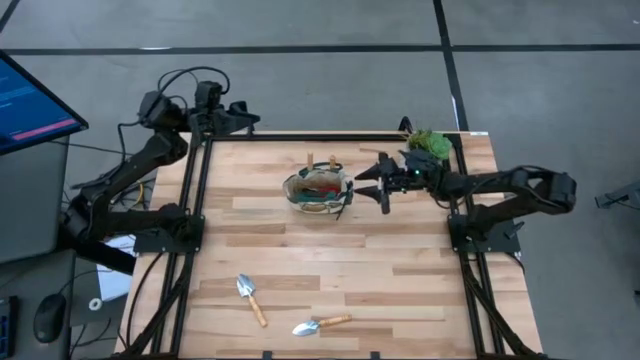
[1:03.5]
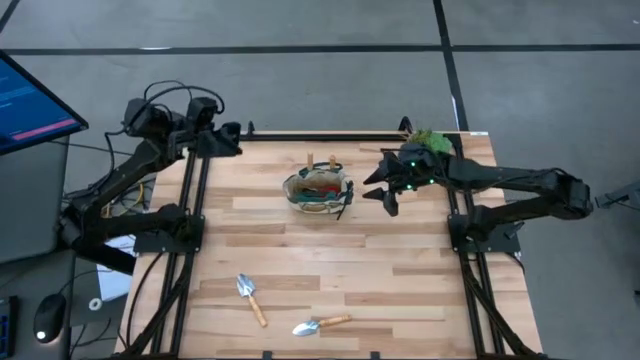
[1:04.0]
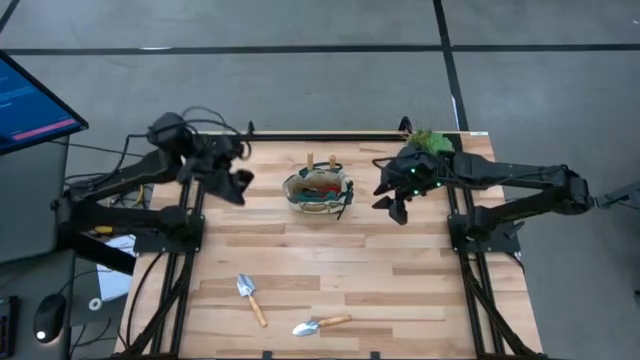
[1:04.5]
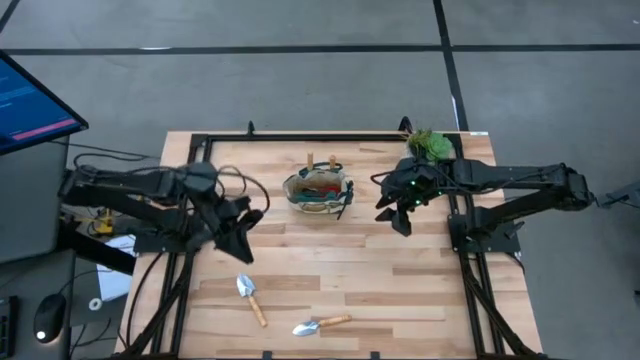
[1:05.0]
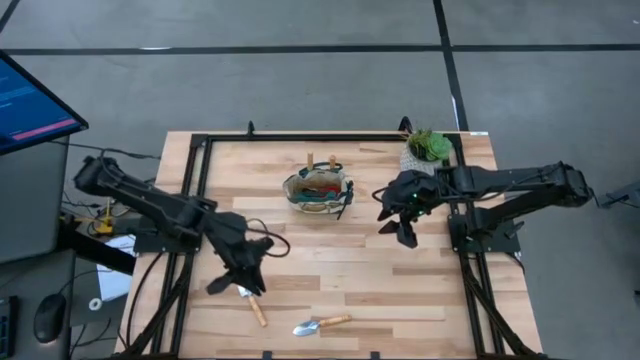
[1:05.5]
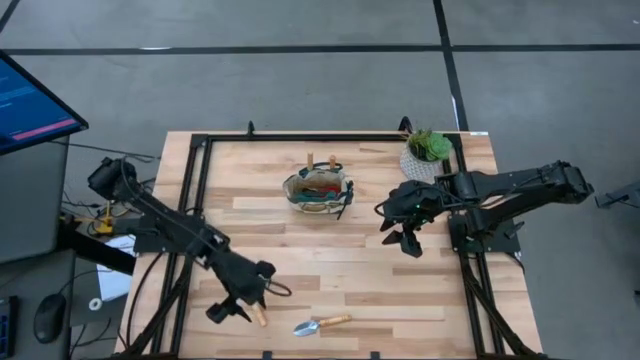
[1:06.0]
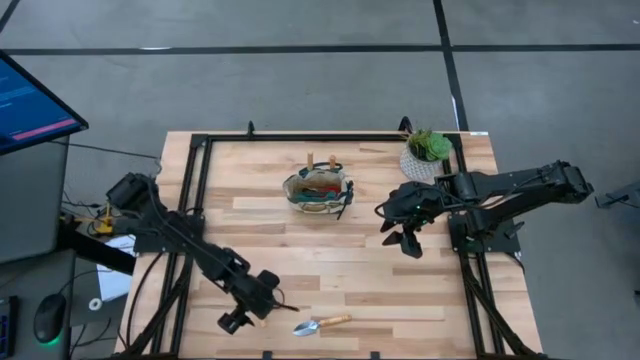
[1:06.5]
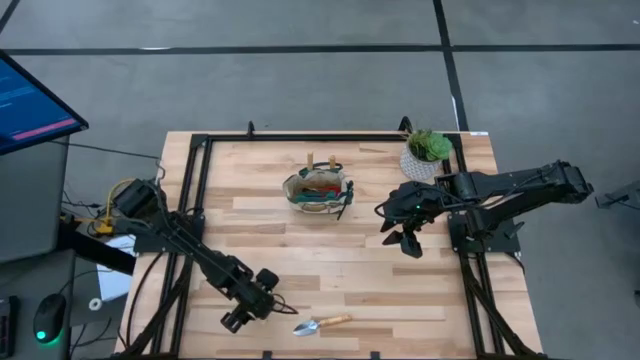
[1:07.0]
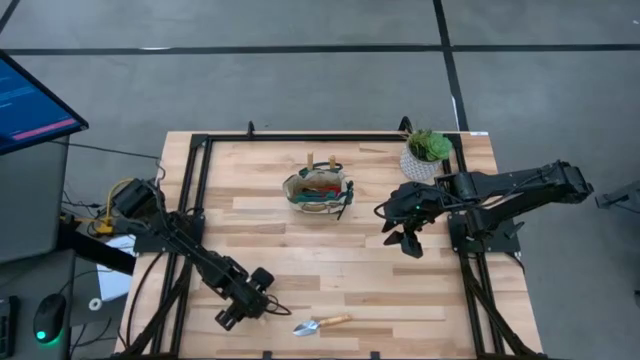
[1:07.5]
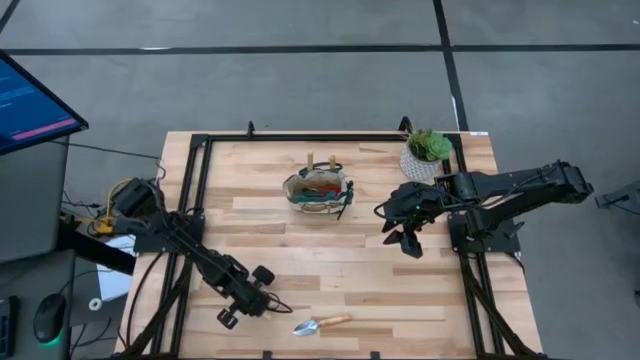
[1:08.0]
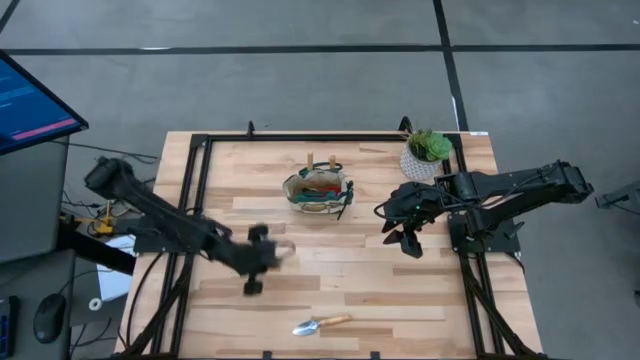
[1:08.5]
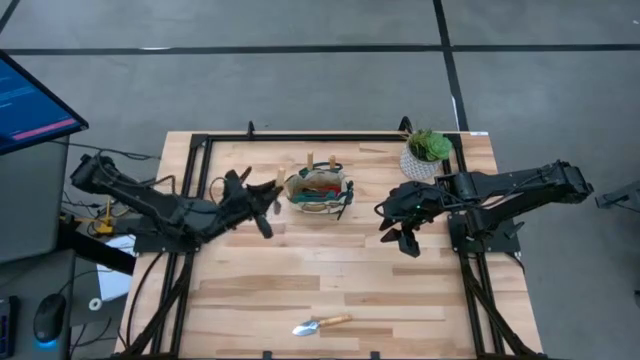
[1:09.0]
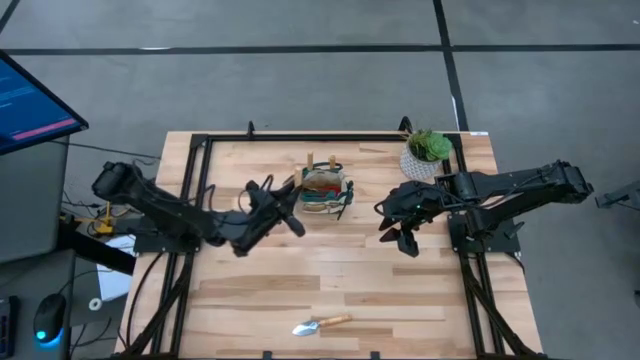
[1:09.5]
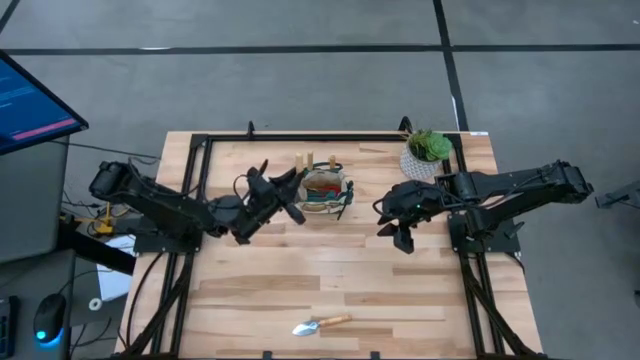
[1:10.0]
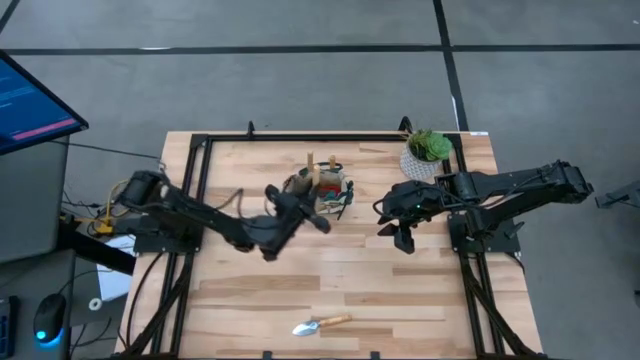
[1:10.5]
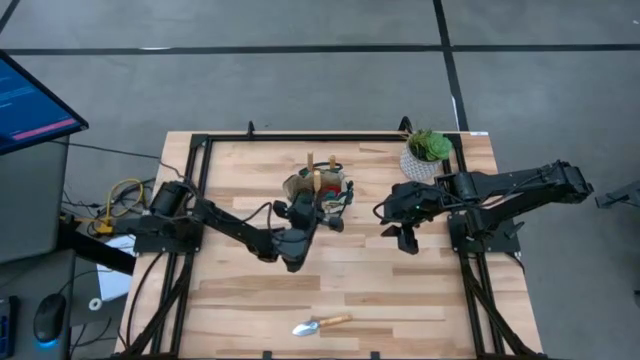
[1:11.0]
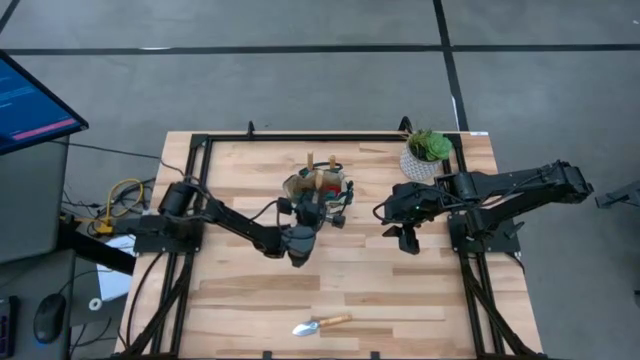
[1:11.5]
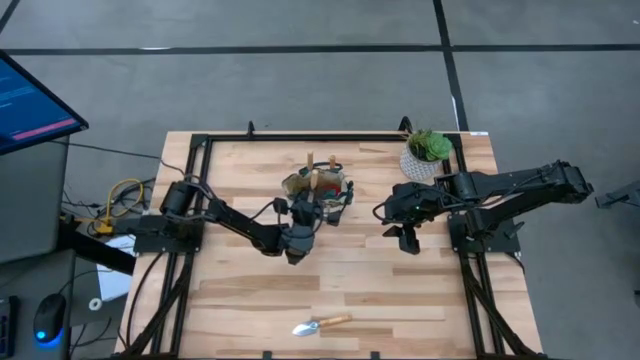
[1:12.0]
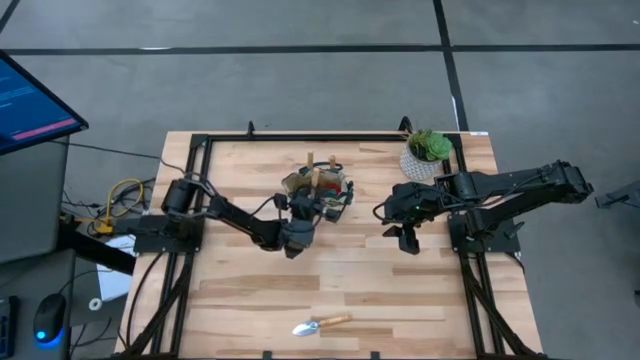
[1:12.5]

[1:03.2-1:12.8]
Task: Pick & Place Garden tools in Gardening bag
Put the trowel into the gardening bag

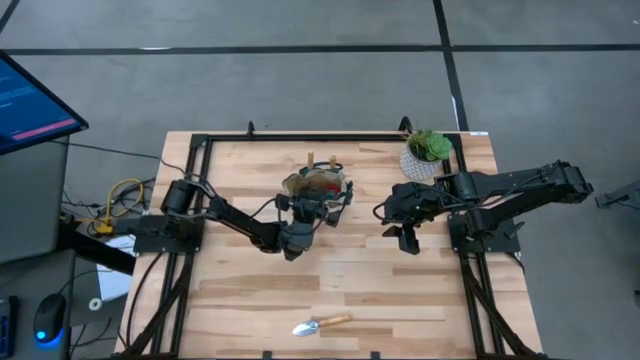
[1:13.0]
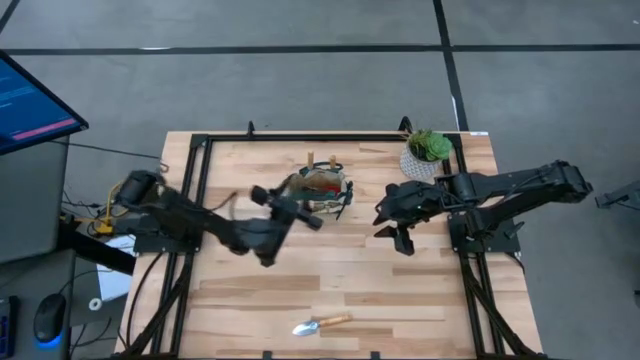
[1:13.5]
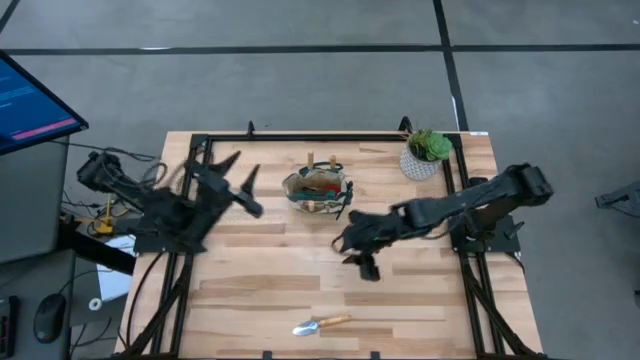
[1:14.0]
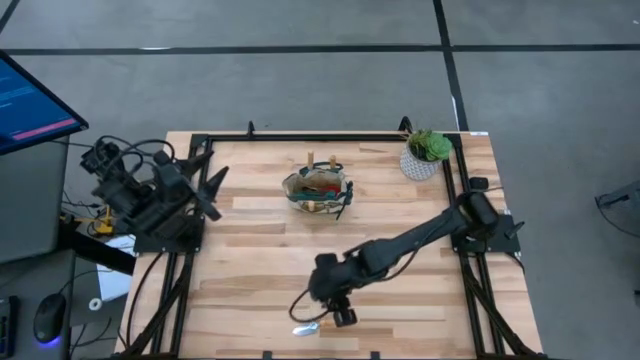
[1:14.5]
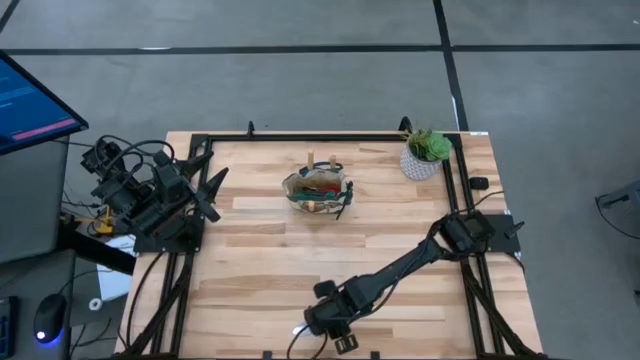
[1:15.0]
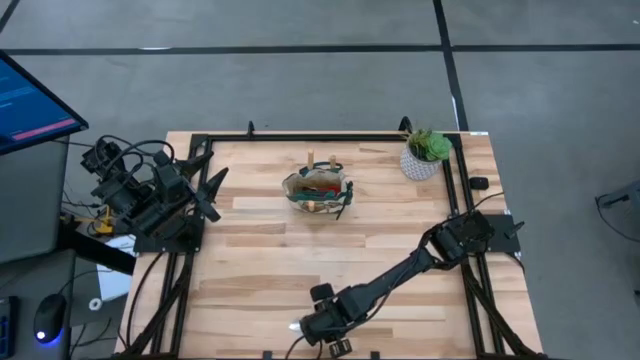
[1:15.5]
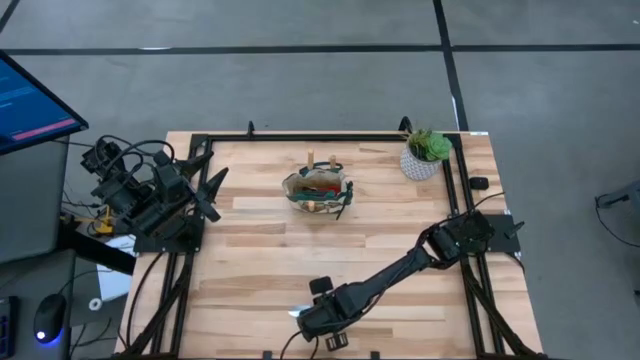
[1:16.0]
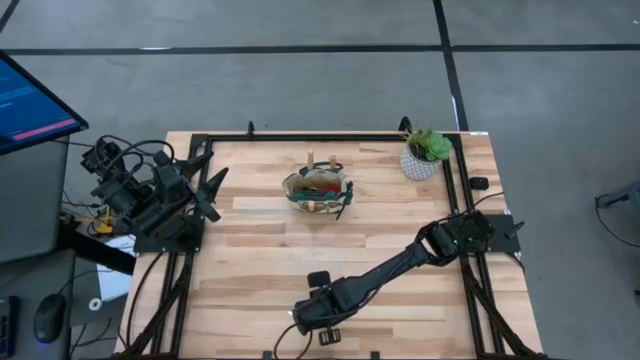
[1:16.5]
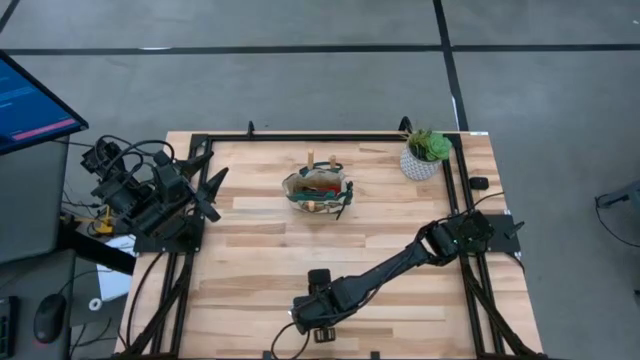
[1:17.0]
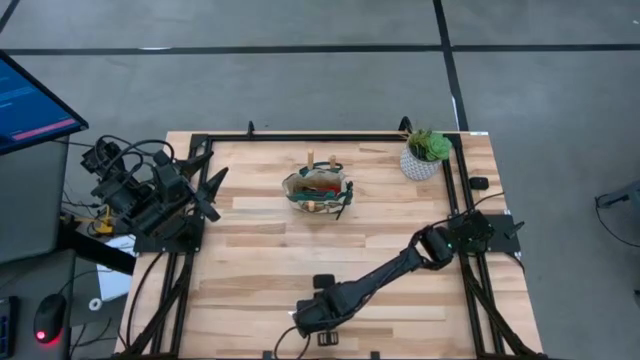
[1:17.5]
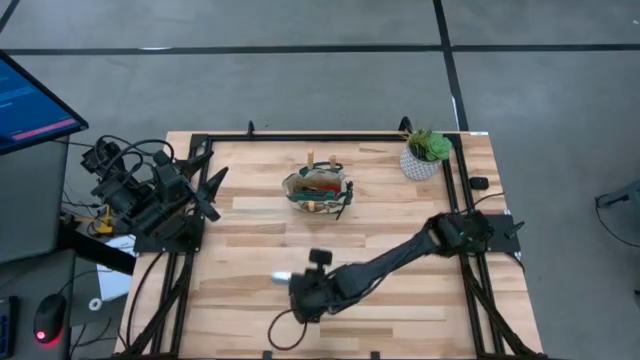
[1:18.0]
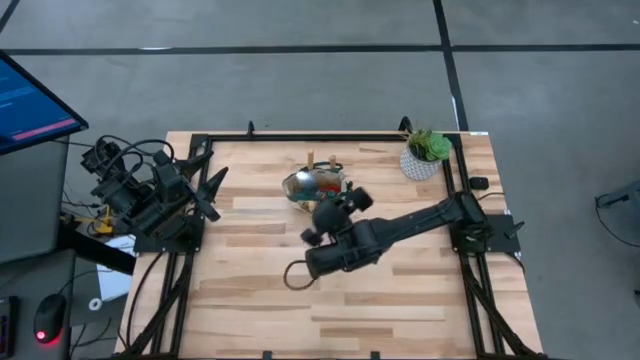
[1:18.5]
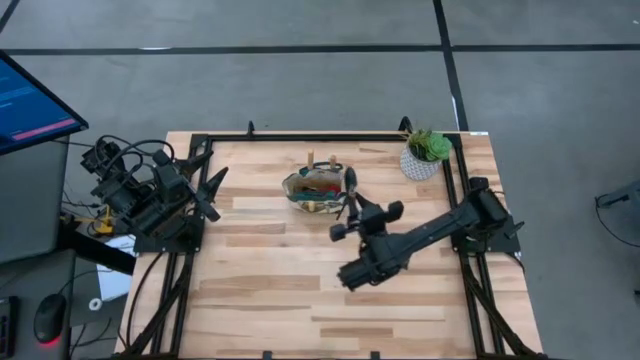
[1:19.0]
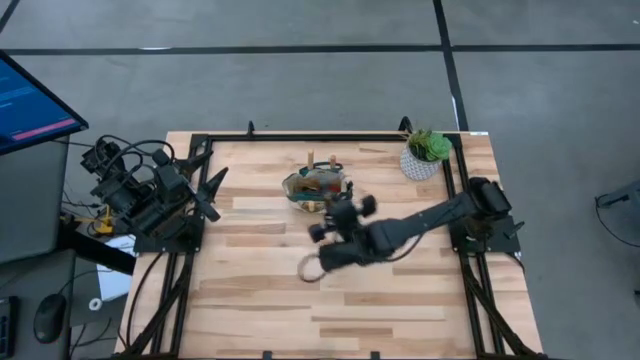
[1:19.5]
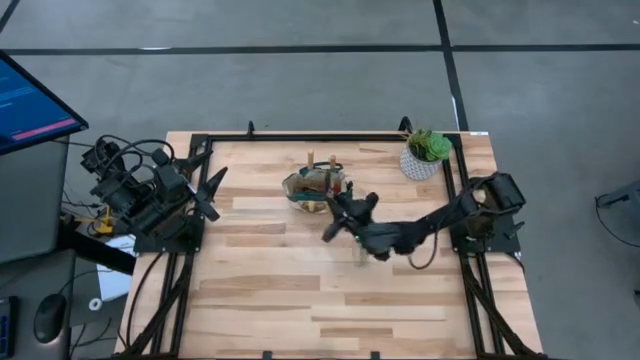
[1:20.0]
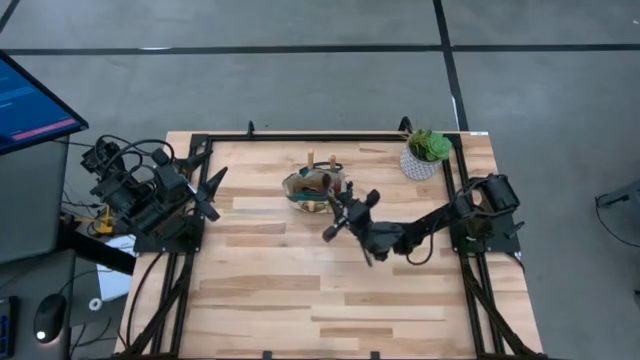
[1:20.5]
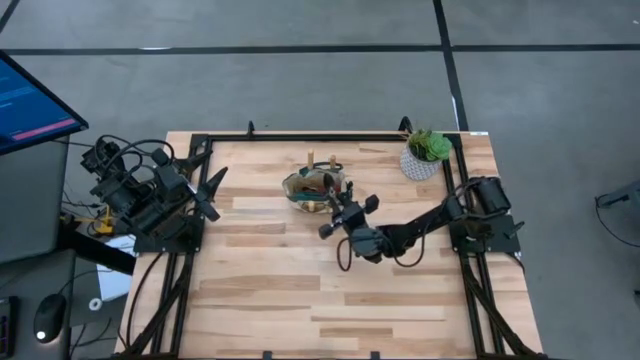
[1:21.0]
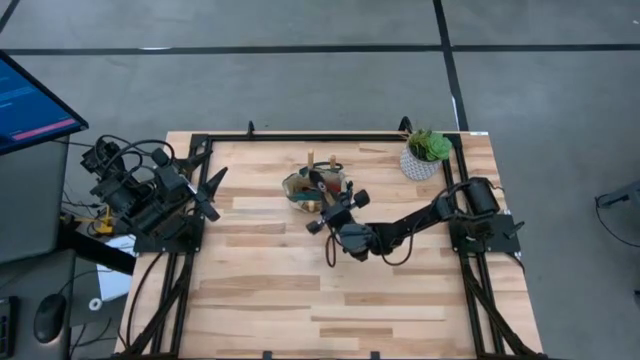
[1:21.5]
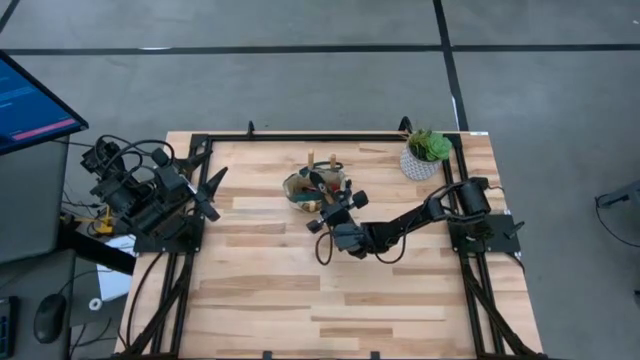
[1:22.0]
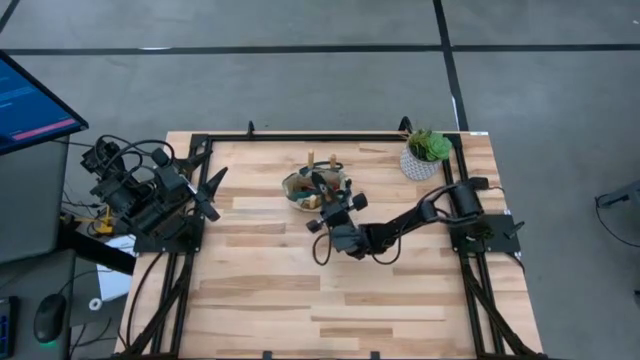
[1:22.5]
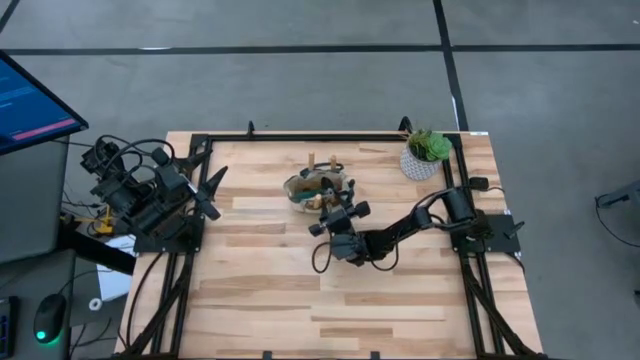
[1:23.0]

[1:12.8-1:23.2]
Put the trowel into the gardening bag
